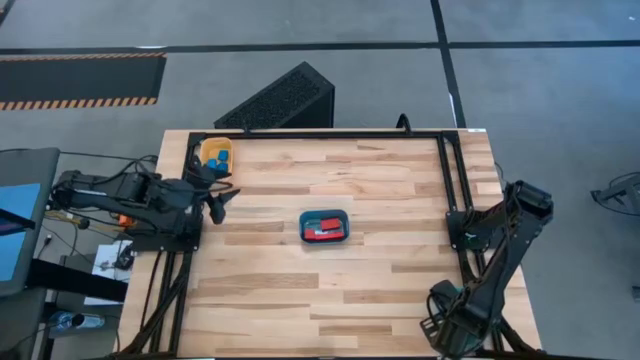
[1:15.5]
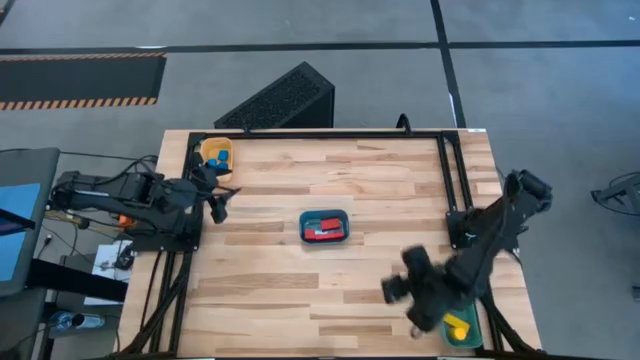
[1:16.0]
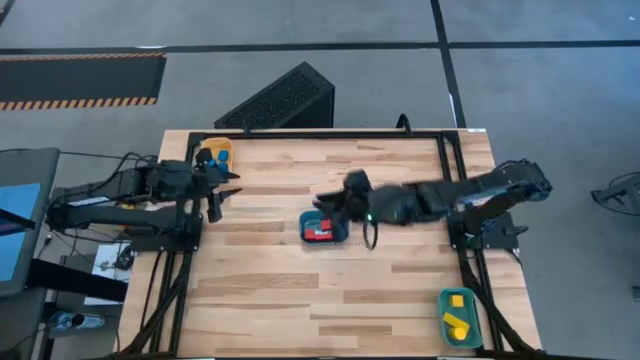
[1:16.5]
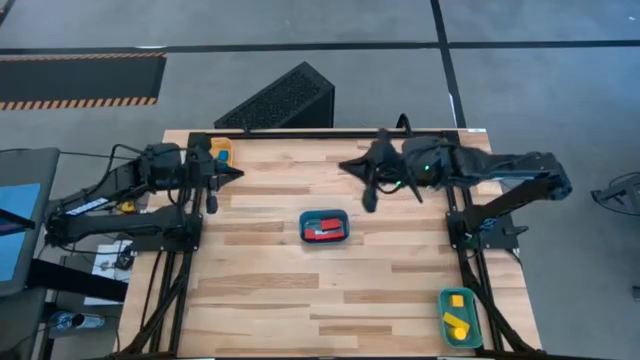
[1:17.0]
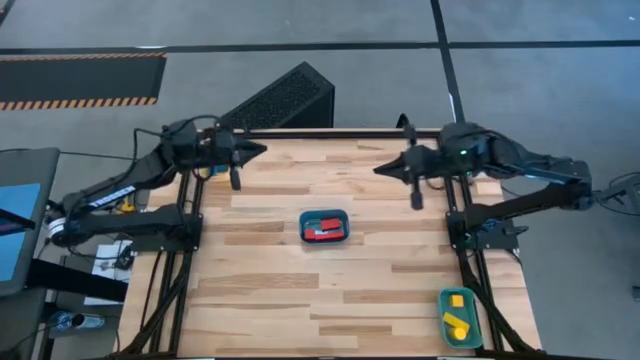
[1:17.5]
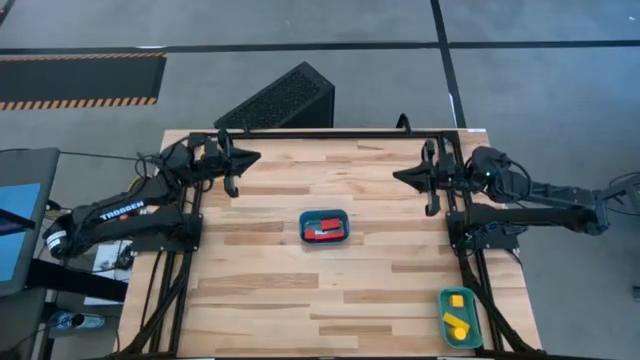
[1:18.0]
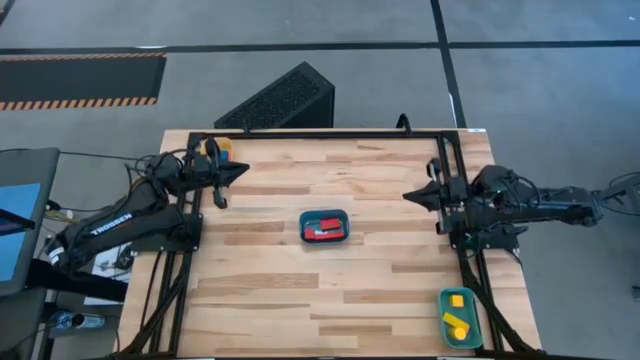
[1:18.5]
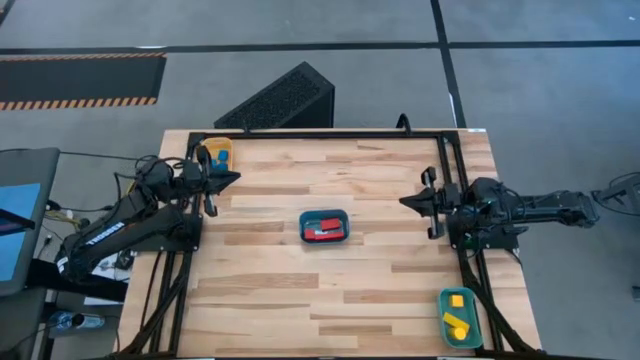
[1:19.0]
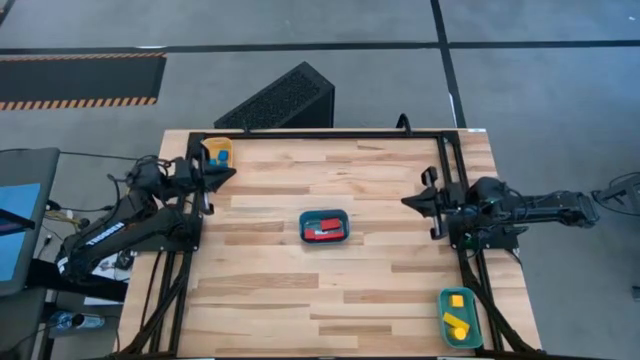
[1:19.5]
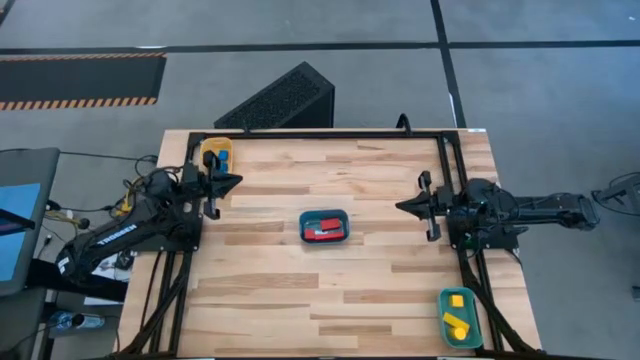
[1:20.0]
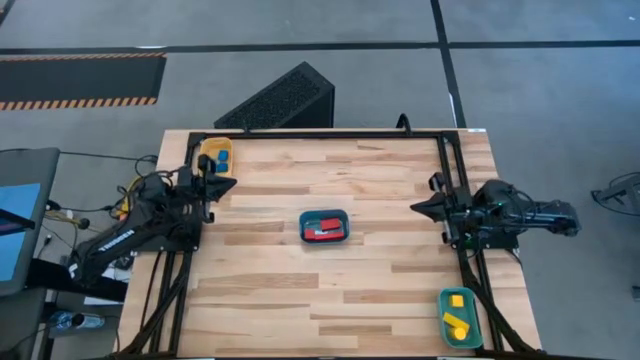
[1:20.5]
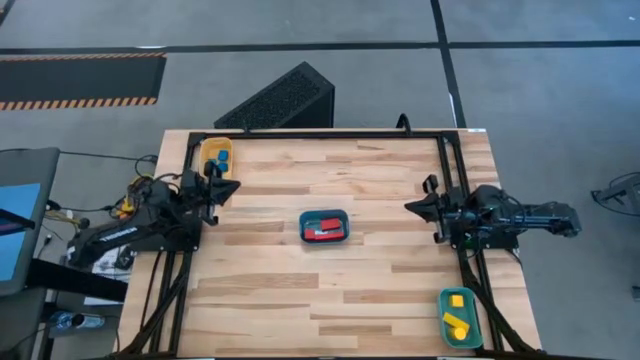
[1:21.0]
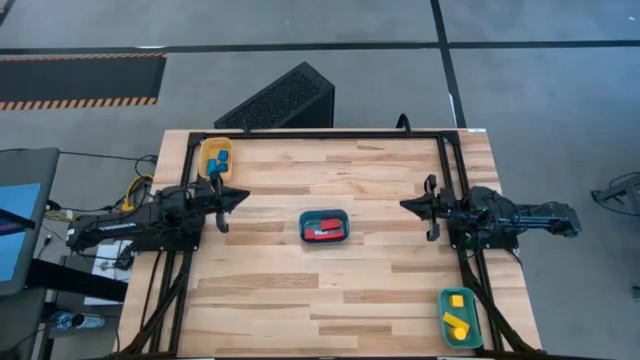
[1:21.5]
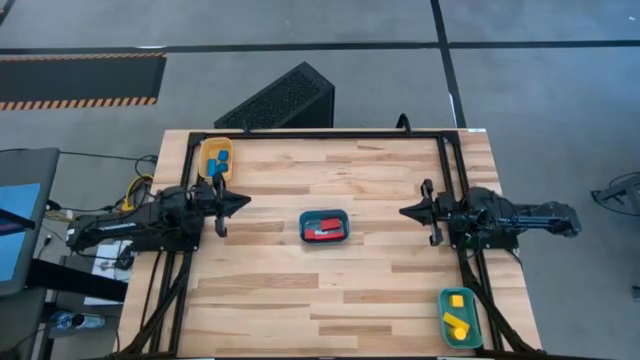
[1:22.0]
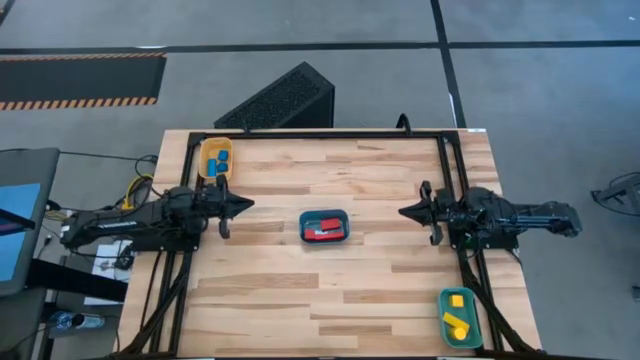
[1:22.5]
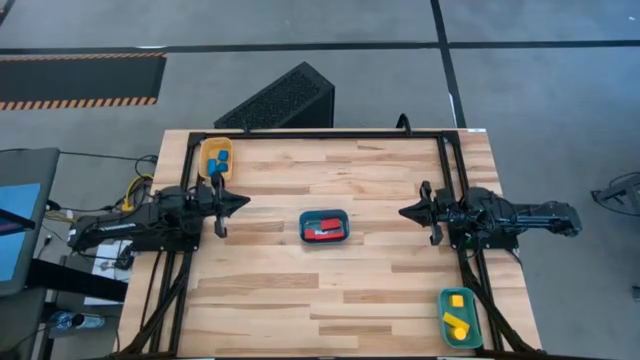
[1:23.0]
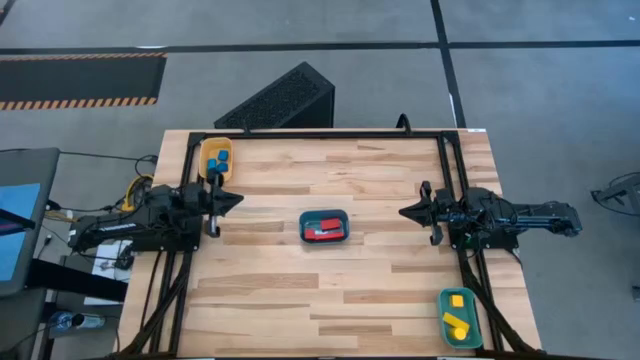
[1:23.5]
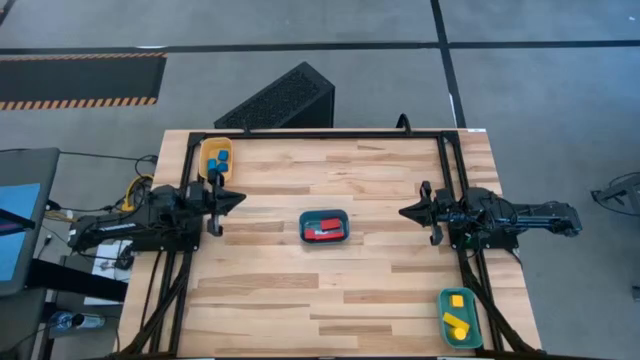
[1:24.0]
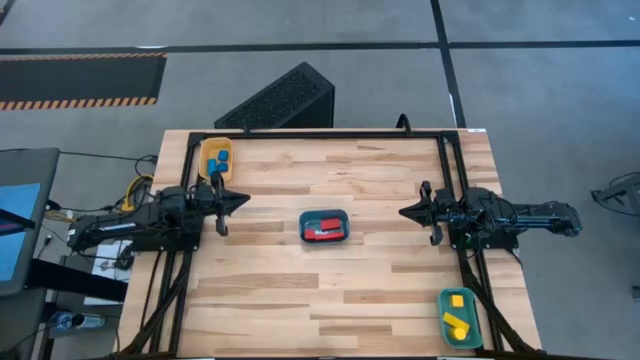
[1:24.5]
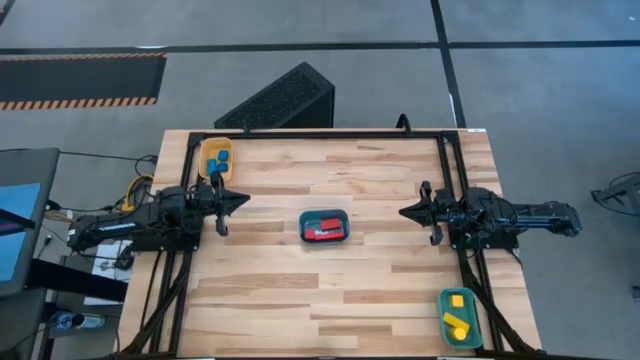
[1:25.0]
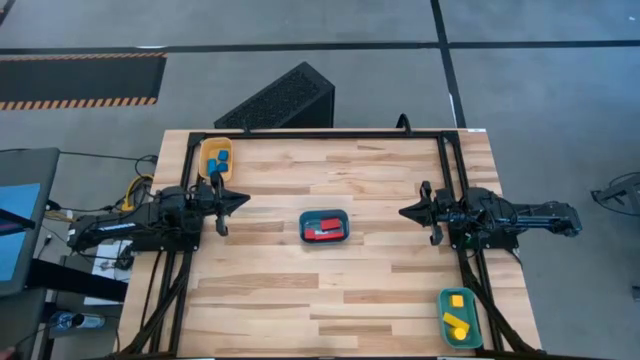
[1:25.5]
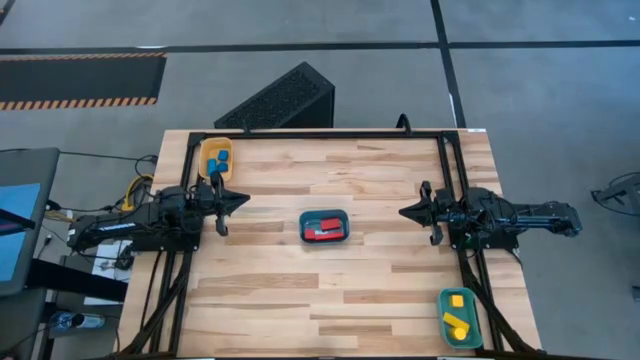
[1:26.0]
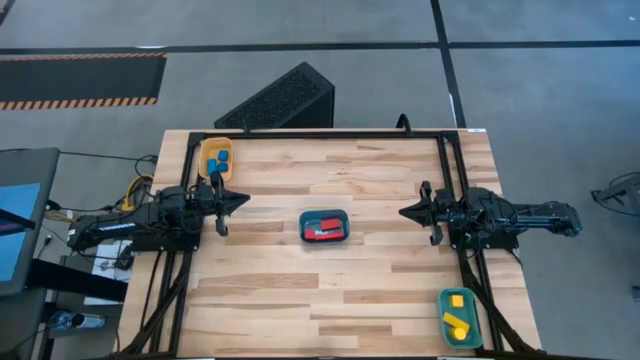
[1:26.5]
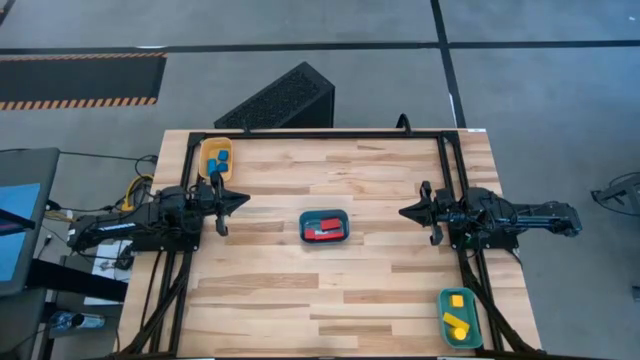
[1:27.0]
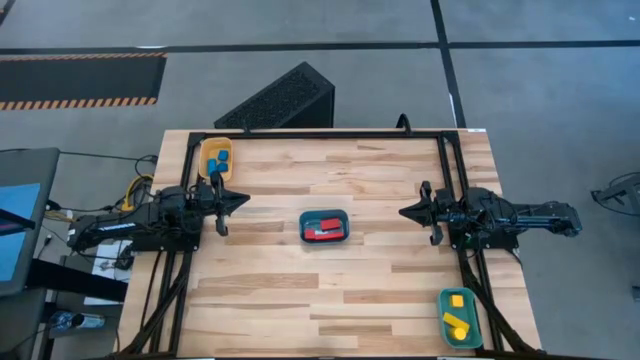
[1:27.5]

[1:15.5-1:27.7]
Task: Sort & place blocks by color
Return to Home Position

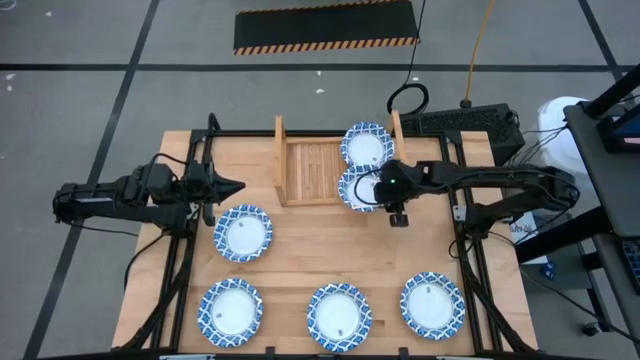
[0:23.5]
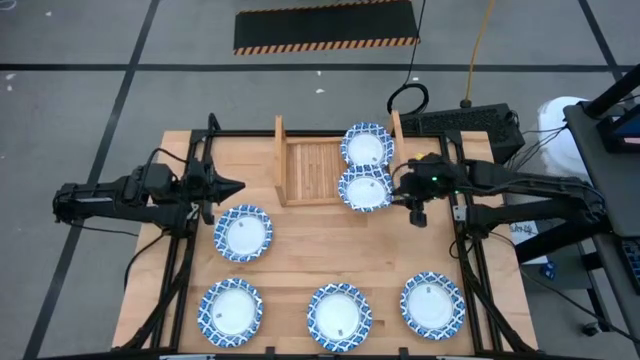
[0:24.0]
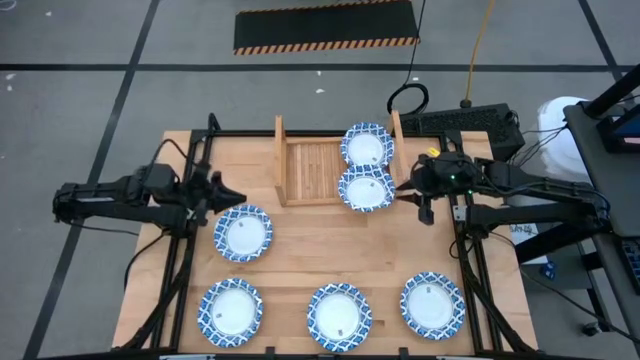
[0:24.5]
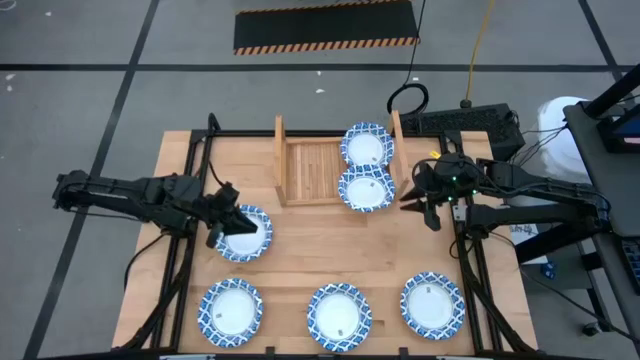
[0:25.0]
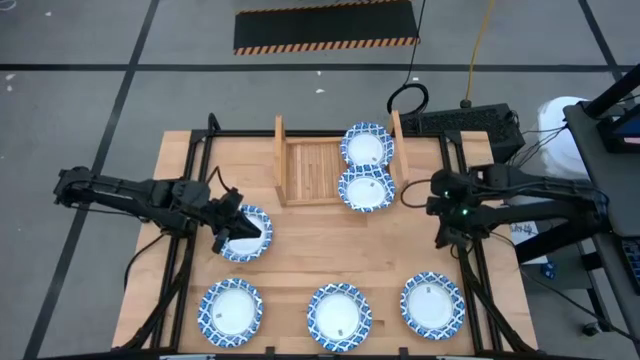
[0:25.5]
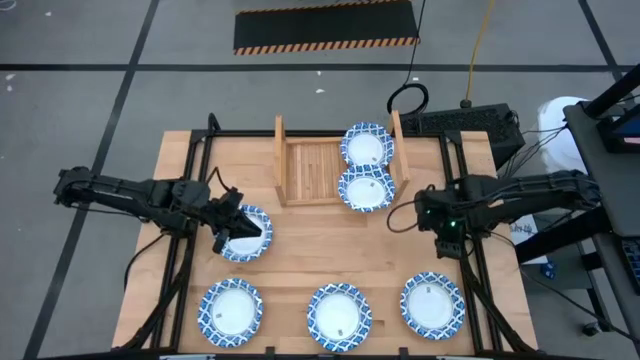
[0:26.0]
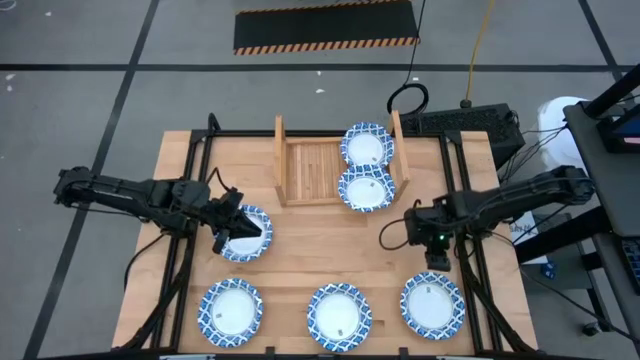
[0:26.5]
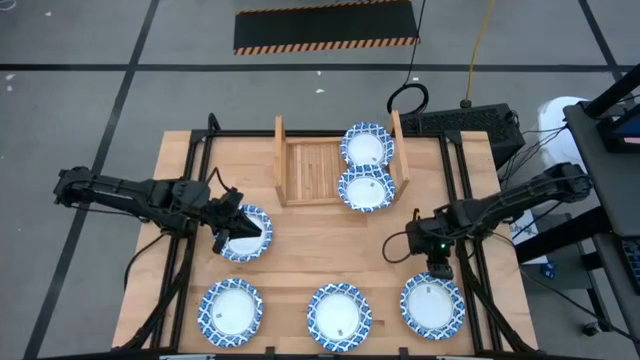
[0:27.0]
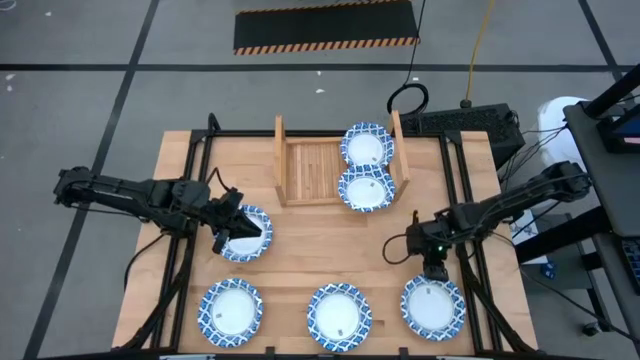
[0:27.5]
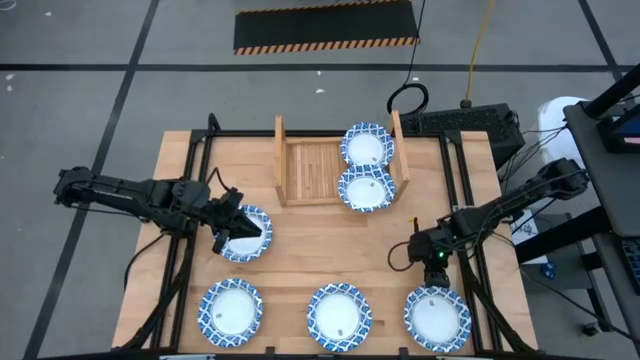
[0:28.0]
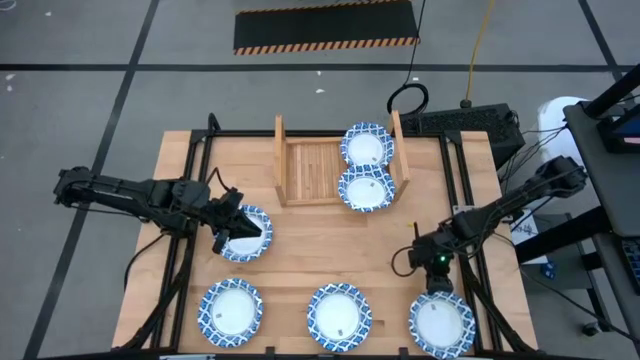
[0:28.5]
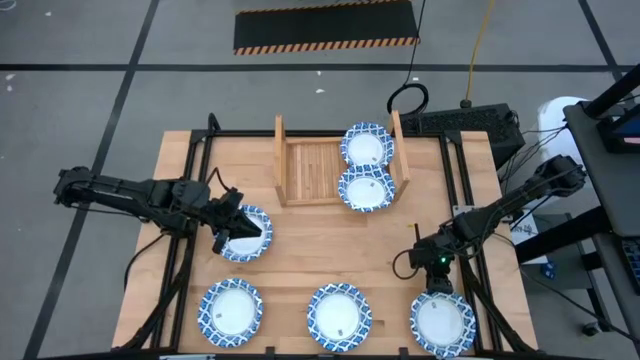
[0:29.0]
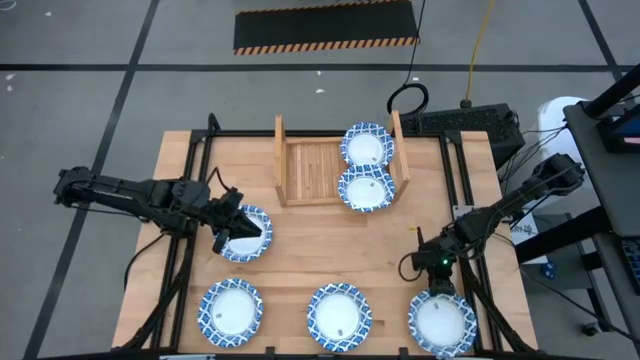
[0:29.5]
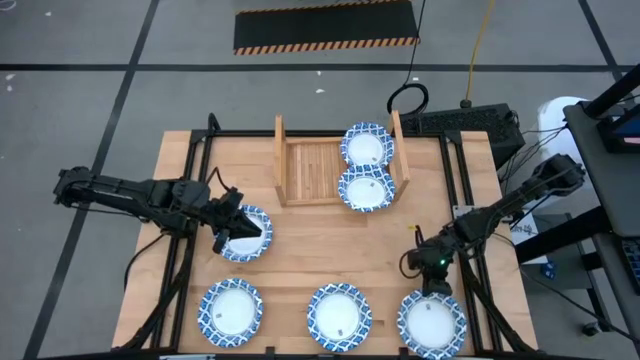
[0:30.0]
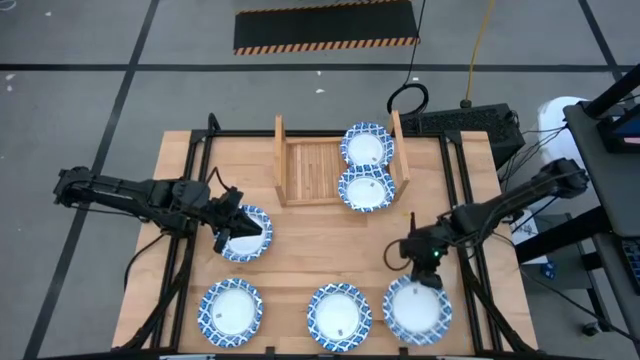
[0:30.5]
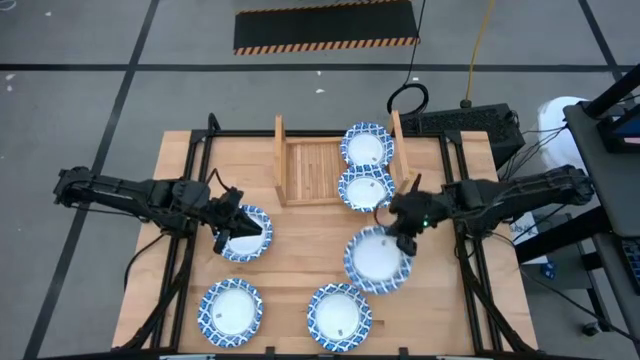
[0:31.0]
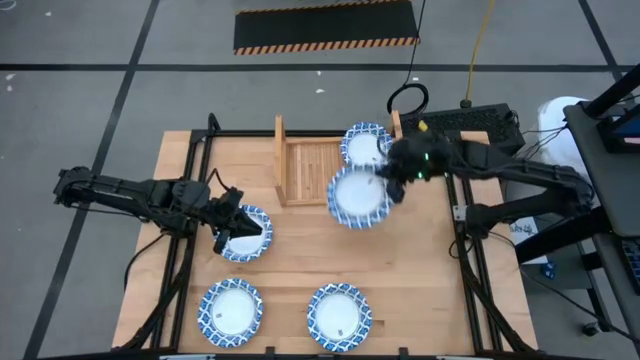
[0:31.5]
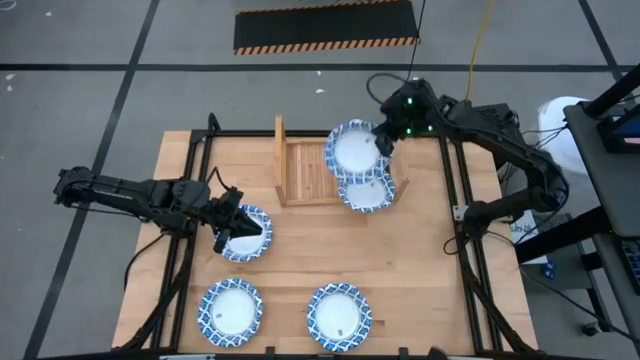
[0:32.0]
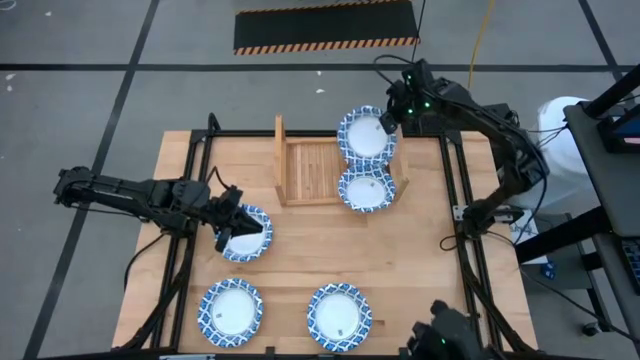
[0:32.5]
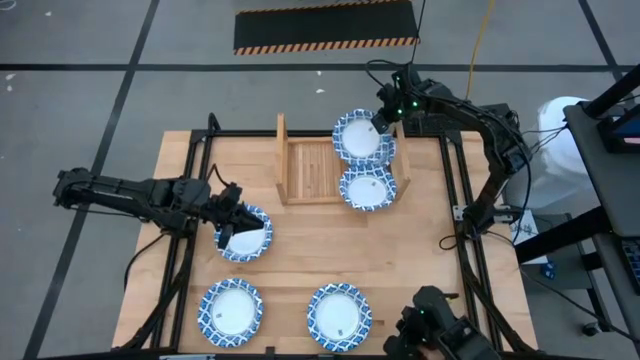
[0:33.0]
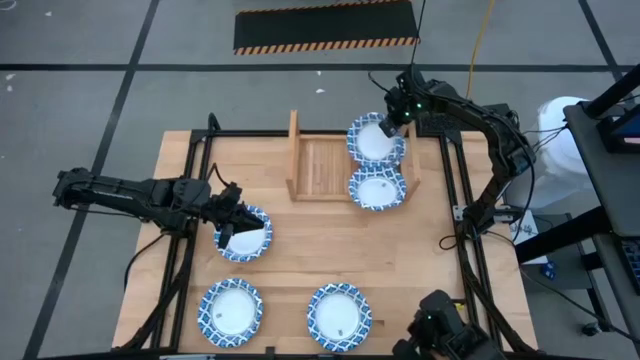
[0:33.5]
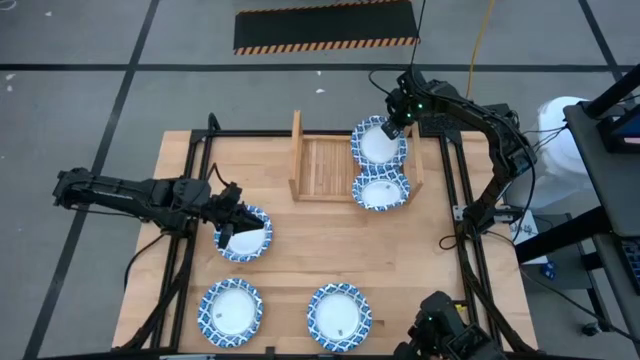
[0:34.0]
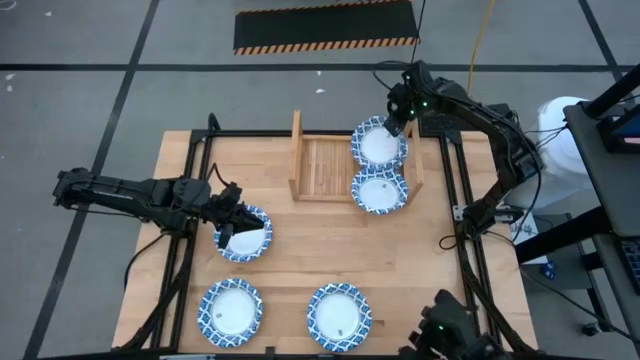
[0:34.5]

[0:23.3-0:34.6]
Task: Place and stack bowls onto a shelf
Stack the right blue patterned bowl on top of the other blue patterned bowl on the shelf
